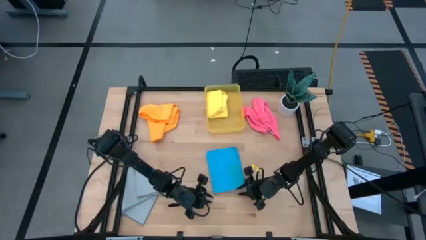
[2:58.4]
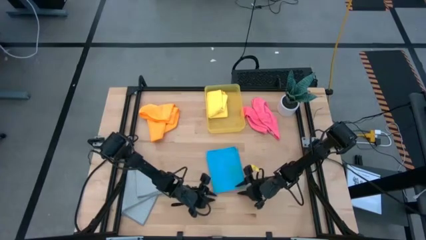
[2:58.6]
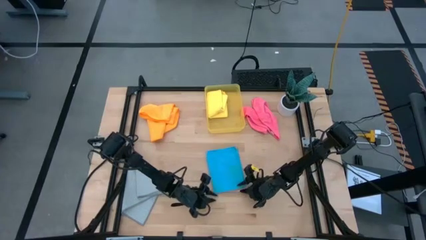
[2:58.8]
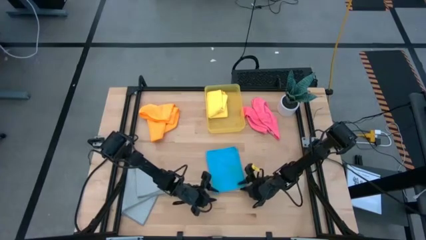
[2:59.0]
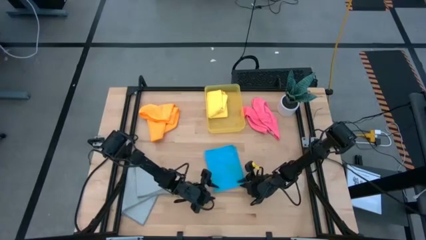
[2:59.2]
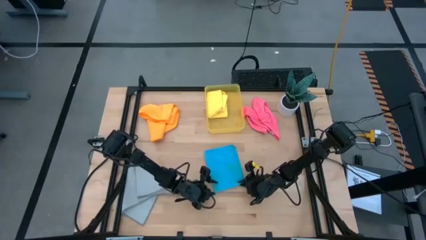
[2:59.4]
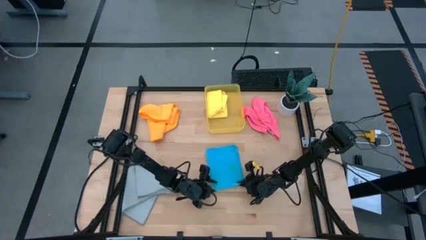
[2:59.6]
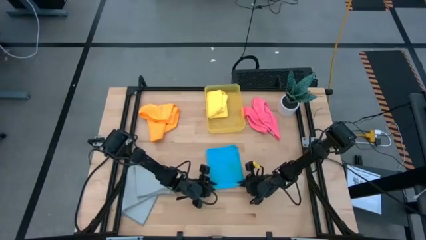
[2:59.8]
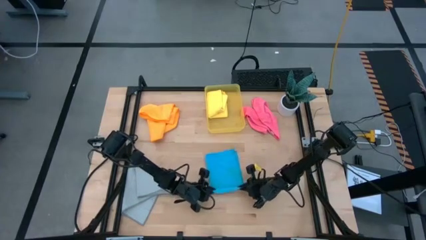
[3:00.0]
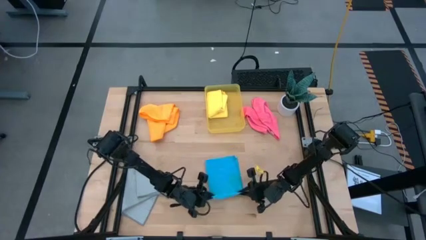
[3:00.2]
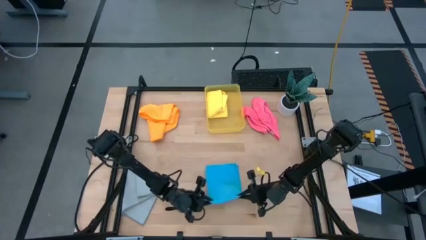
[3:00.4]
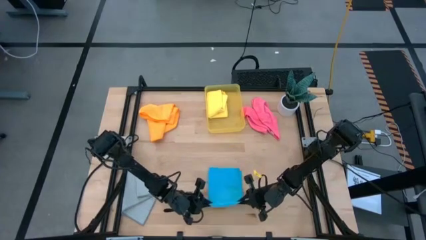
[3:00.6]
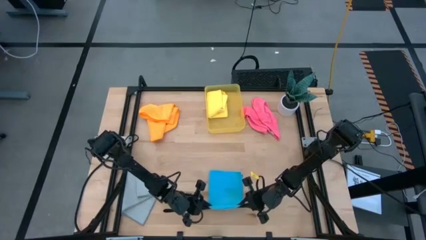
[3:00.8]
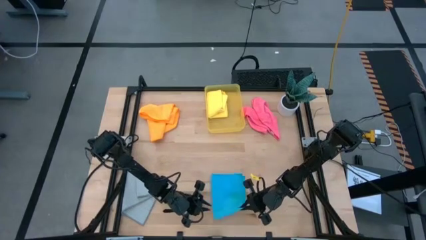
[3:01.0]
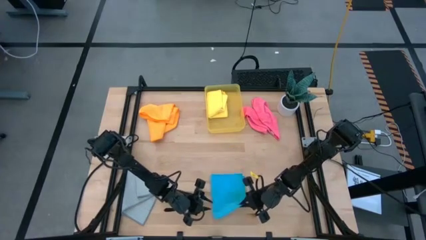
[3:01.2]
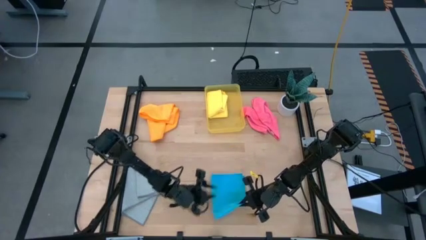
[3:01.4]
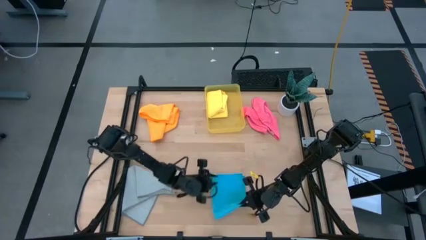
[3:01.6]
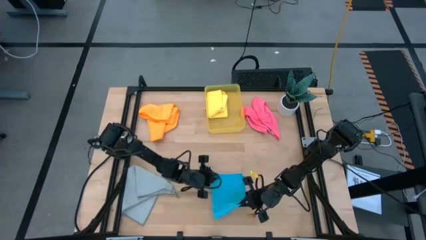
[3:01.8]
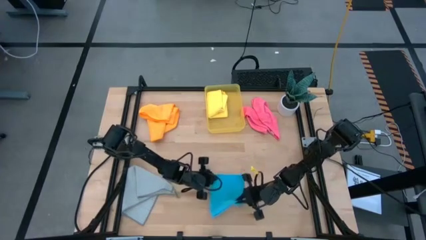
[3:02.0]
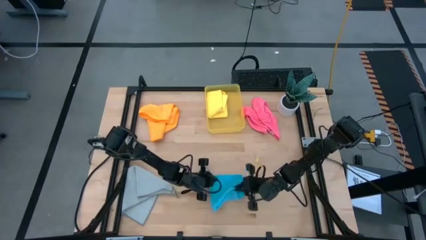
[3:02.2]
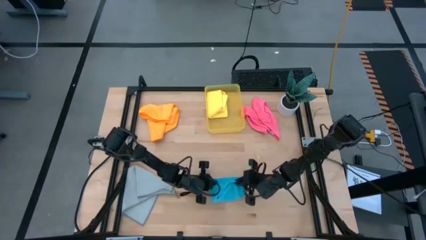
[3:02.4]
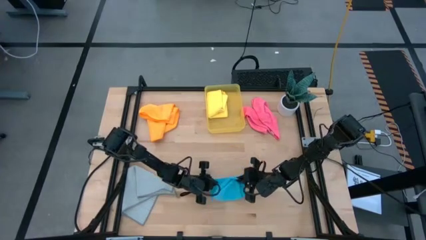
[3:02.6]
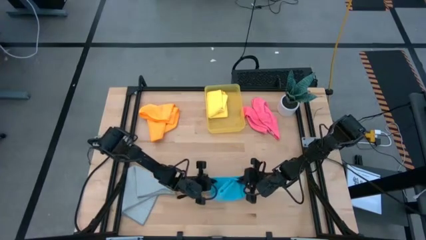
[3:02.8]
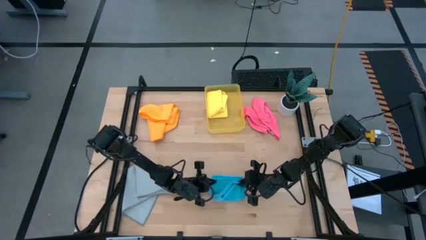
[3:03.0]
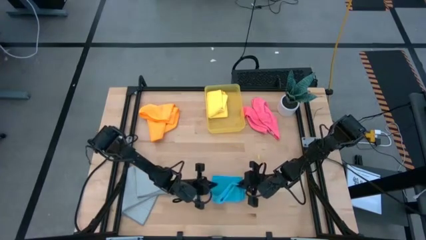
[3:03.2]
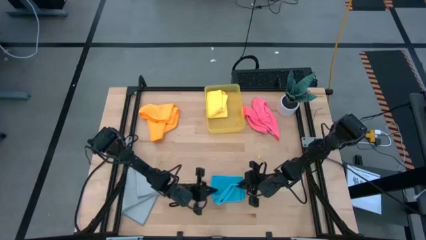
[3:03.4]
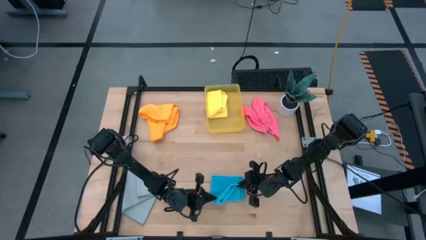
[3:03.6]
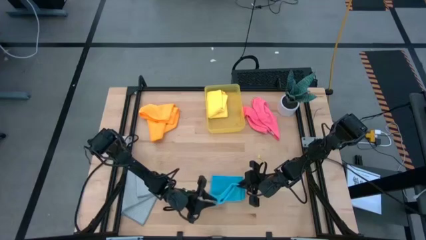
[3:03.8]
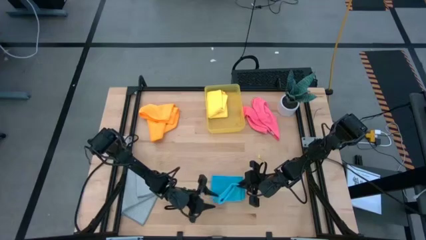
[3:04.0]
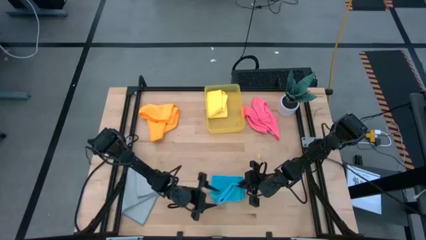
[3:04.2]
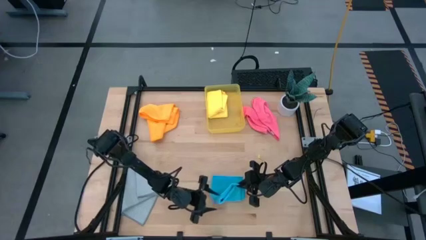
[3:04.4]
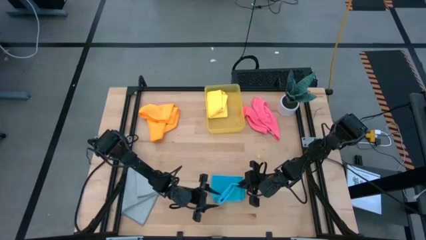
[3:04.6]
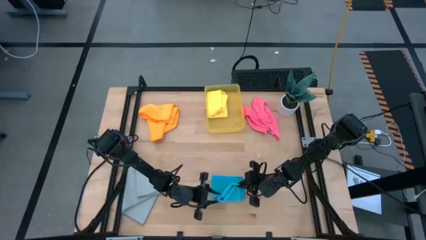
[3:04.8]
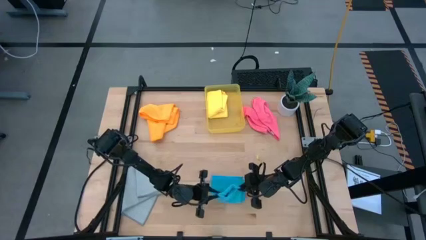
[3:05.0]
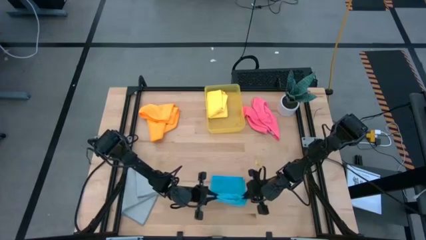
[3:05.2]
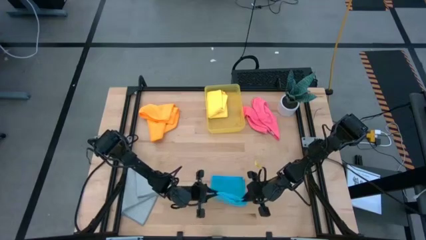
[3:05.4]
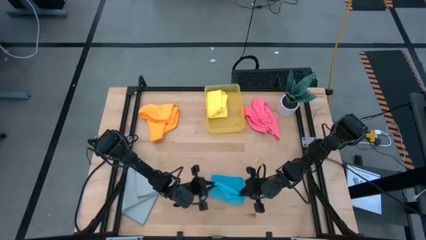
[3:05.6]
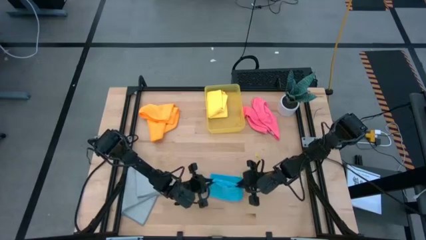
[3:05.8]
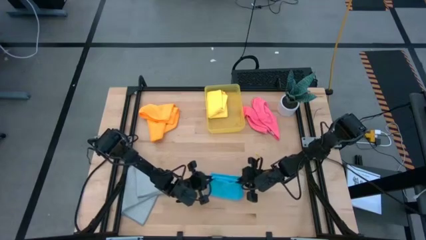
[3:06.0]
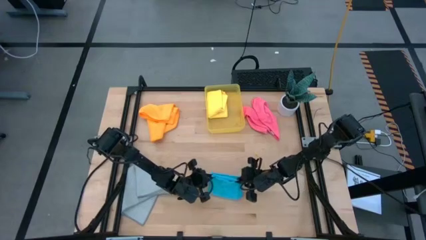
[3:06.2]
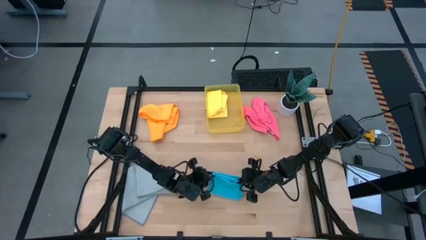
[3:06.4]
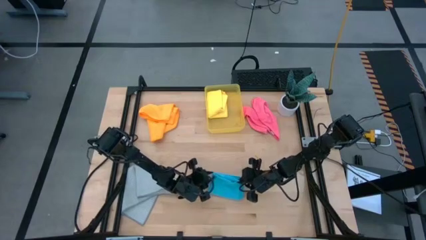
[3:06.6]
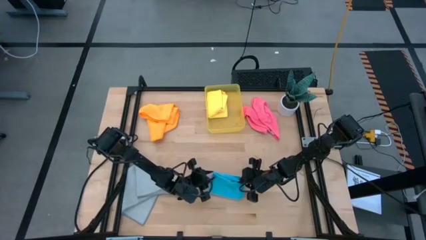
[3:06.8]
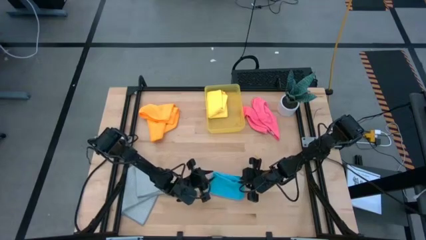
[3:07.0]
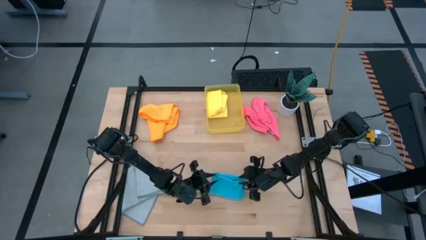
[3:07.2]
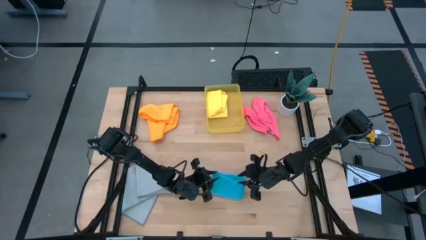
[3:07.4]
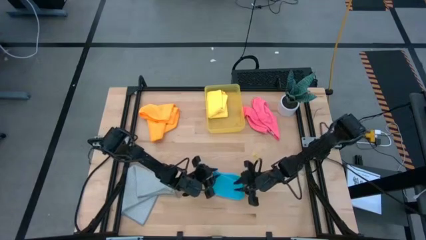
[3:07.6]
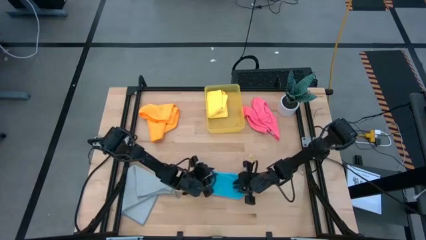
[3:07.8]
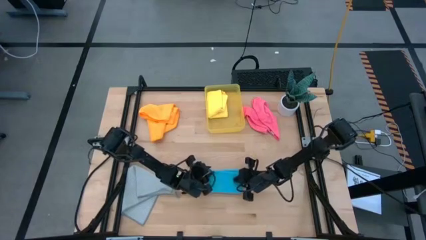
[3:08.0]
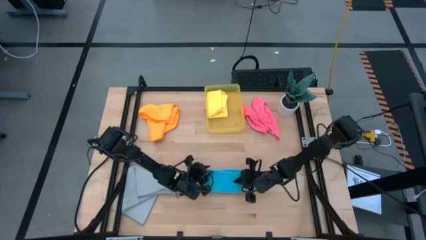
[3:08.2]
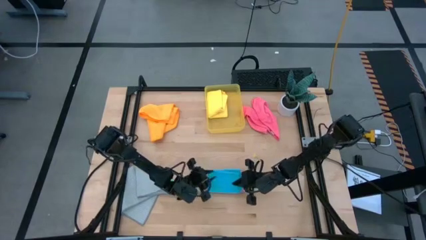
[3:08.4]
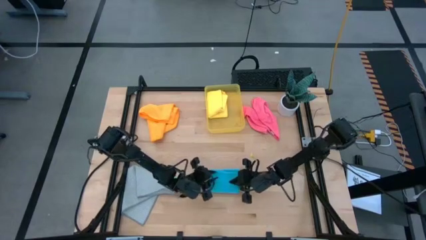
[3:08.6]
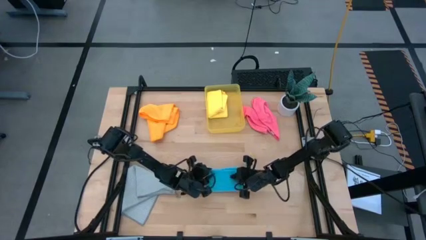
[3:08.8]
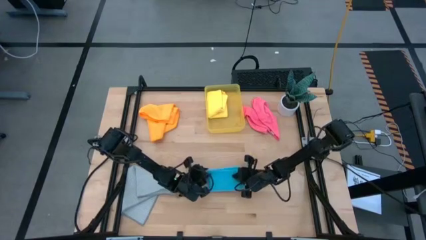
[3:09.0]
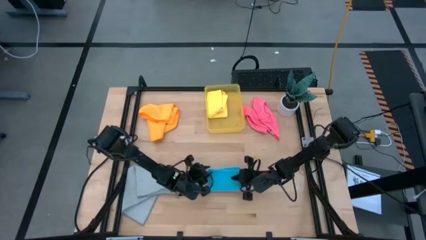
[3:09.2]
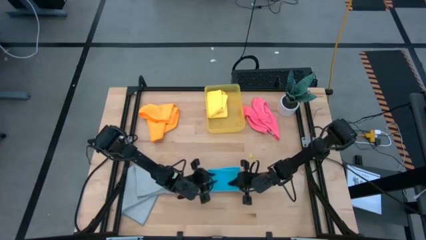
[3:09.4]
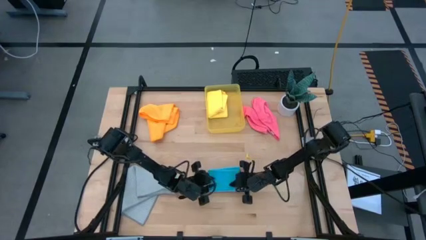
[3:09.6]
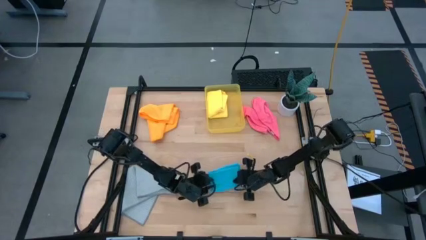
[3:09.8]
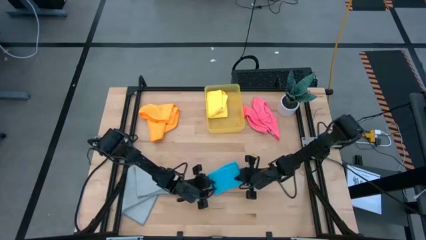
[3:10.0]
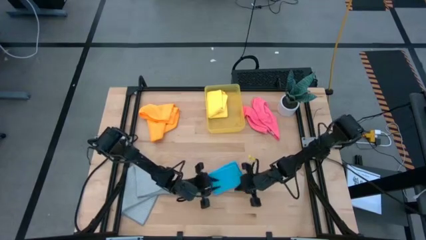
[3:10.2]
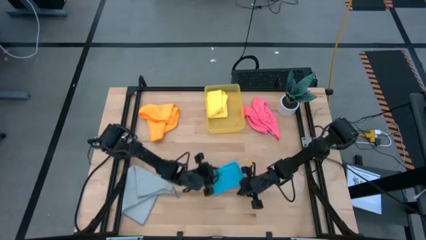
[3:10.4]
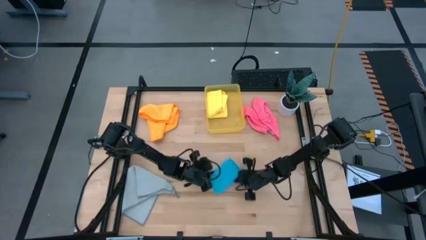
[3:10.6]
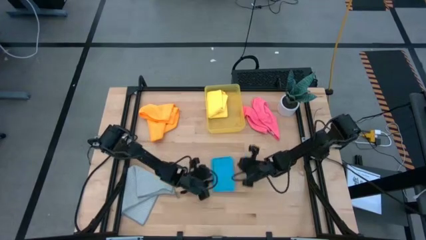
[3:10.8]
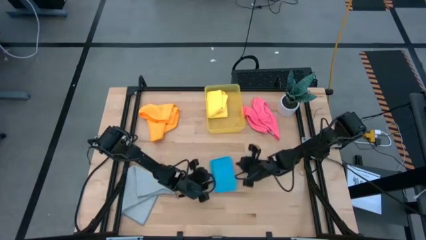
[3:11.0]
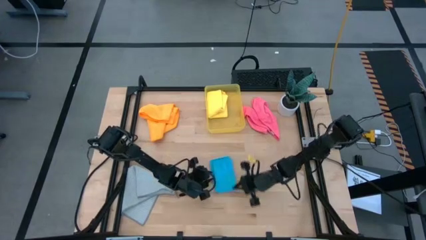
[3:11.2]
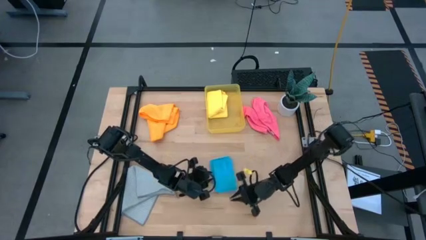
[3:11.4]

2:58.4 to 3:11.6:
Task: Fold microfiber towels
Fold the blue microfiber towel

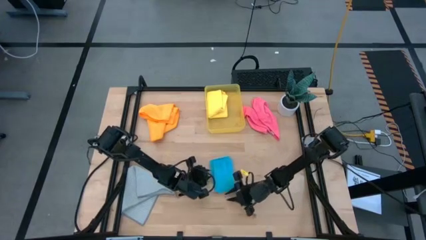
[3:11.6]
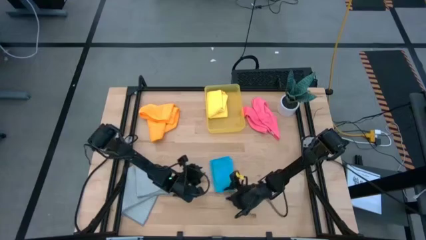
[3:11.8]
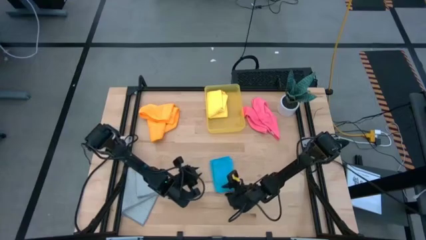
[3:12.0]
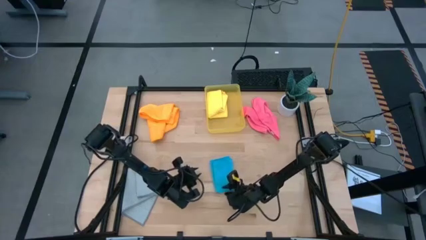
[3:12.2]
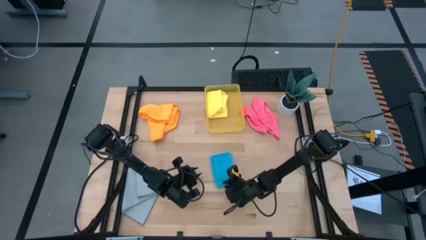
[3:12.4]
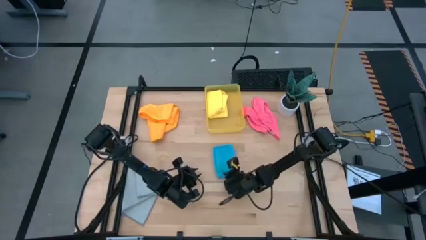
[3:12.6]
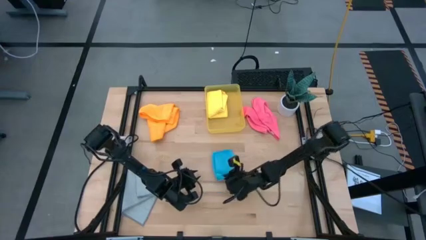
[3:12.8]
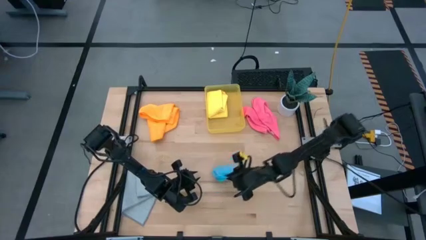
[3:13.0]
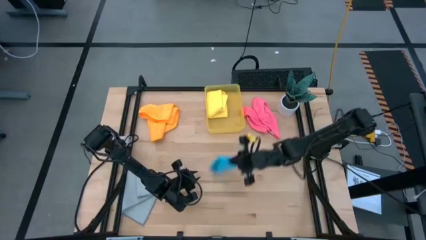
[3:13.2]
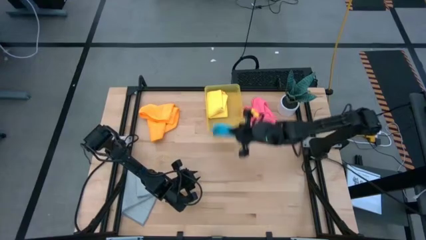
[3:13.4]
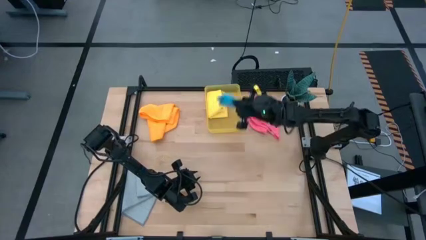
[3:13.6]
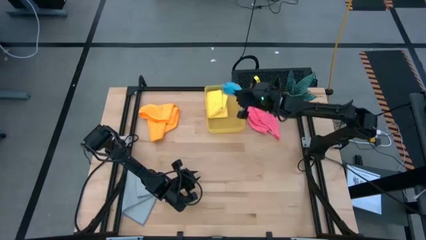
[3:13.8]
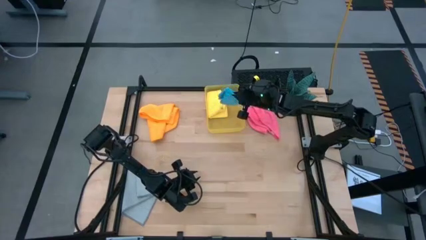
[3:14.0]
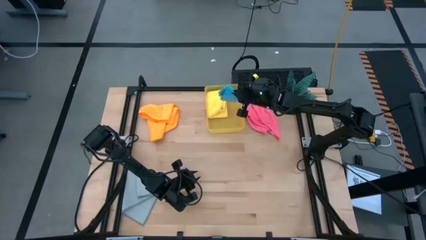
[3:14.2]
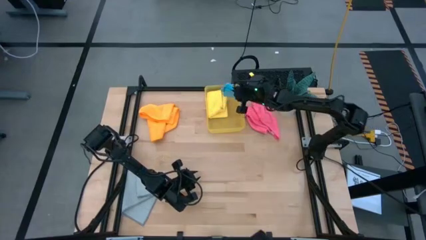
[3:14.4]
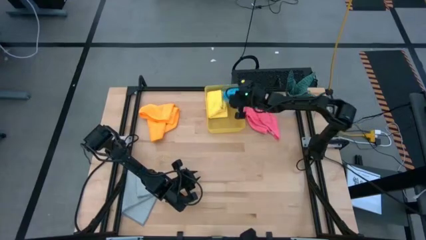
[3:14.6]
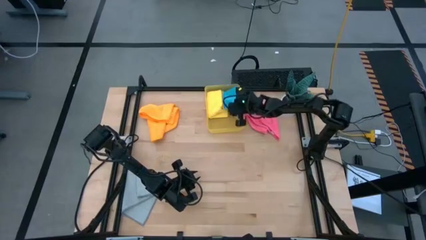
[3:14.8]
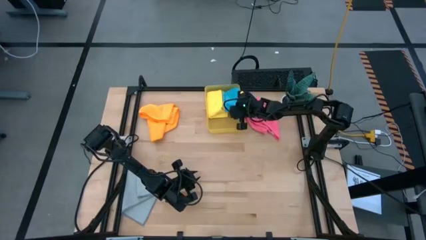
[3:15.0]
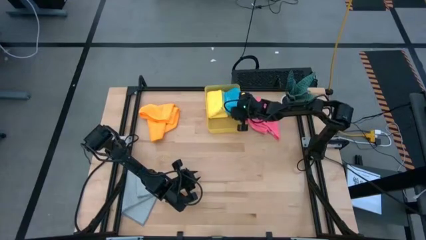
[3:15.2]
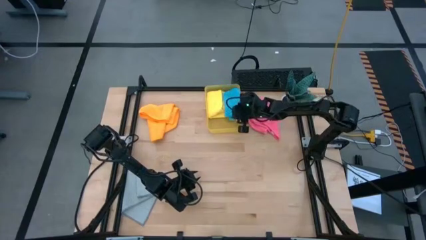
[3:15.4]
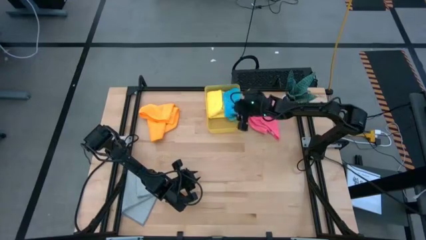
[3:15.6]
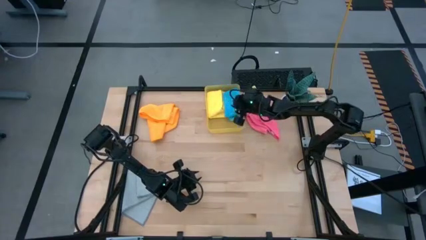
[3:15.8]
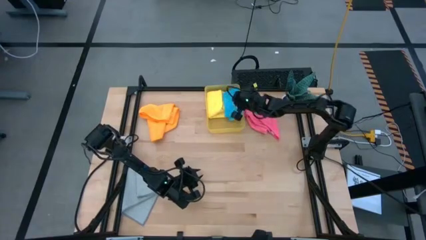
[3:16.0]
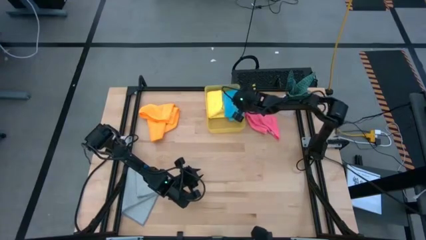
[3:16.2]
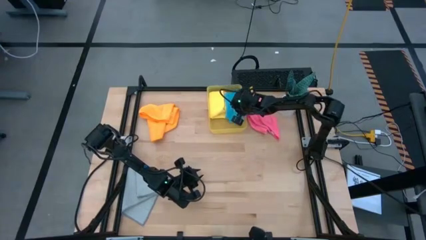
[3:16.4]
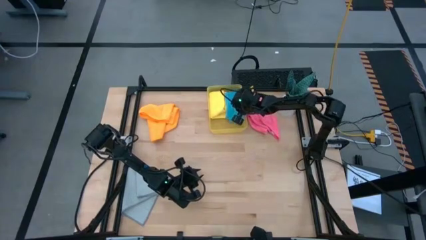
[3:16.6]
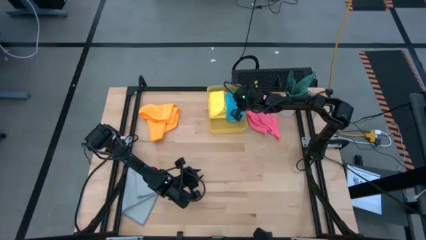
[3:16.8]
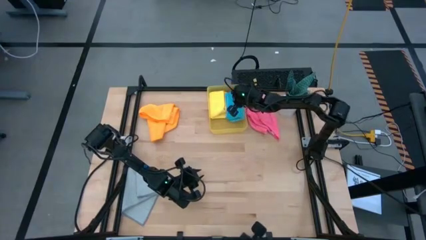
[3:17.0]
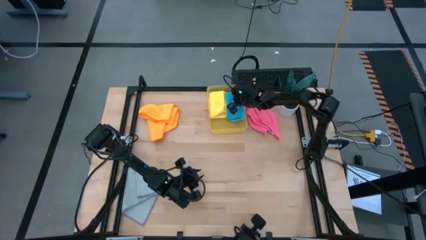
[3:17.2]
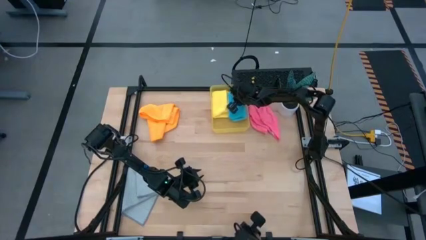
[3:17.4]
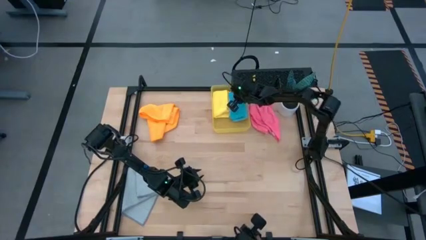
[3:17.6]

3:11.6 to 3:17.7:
Put the folded blue microfiber towel into the yellow bin
